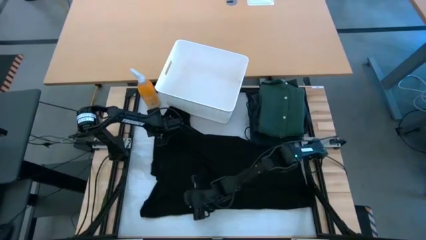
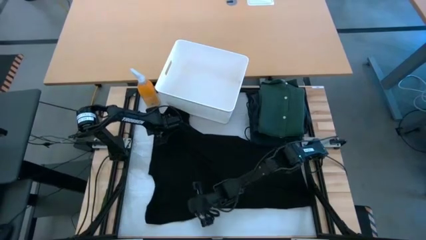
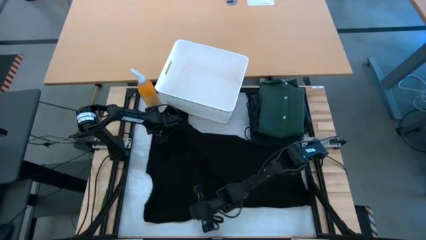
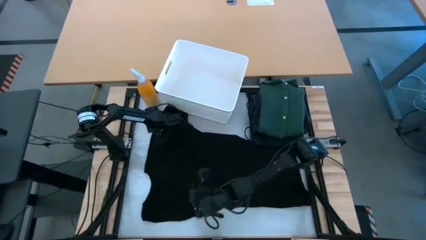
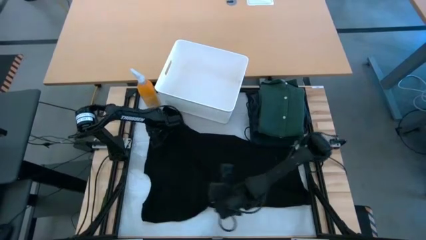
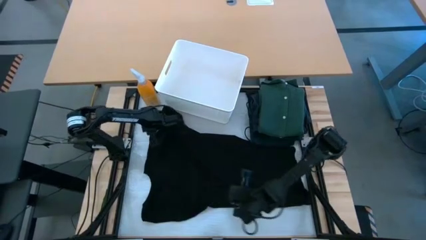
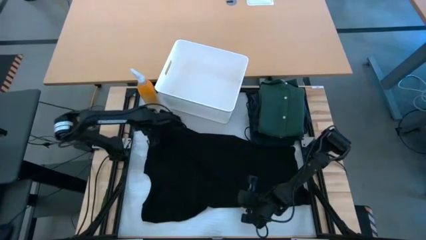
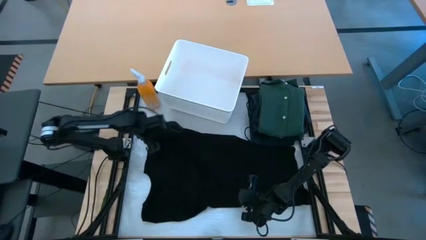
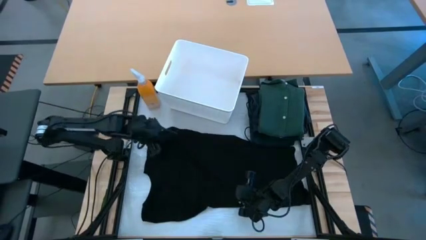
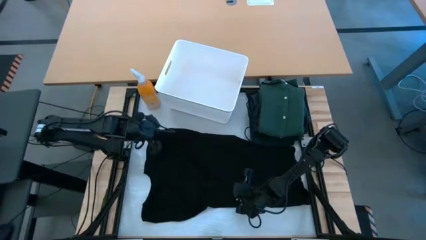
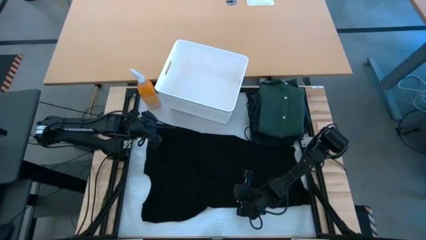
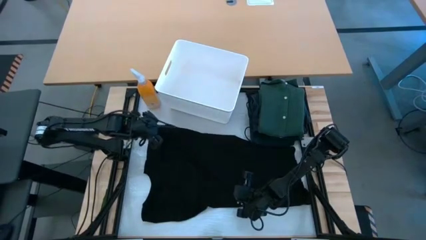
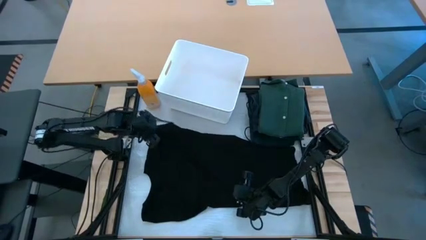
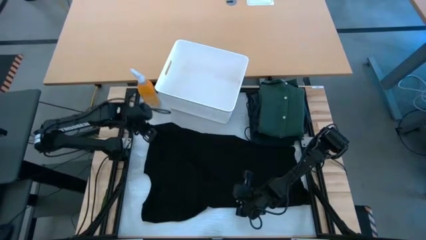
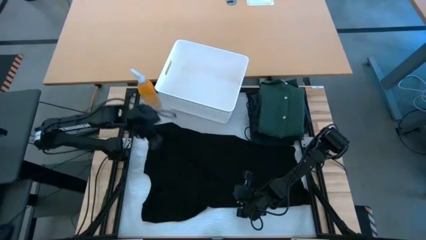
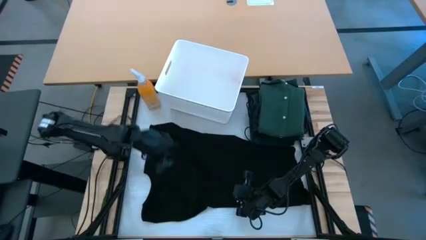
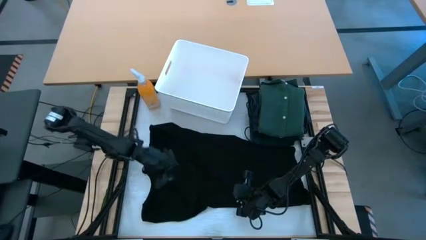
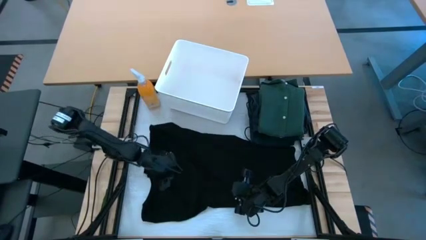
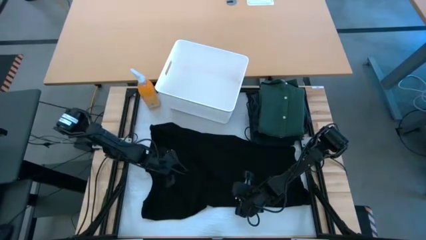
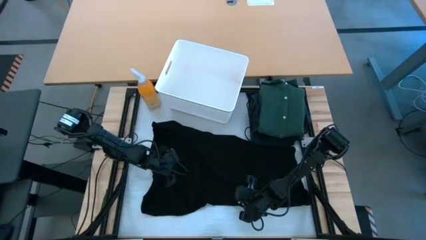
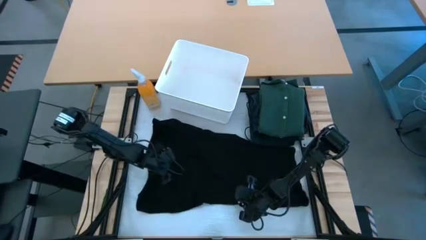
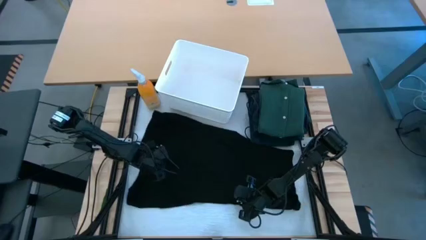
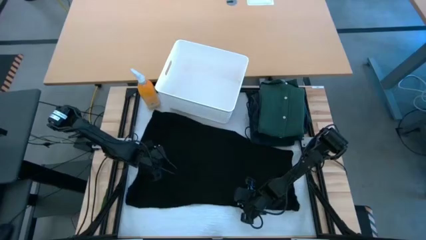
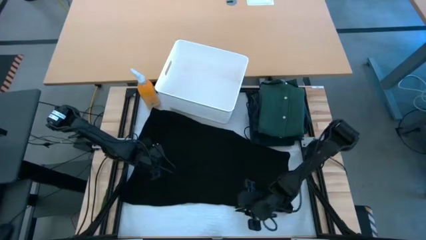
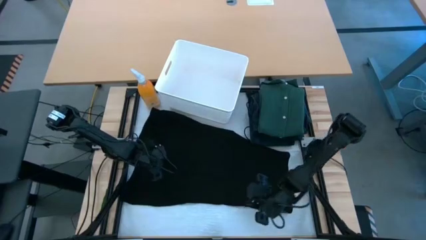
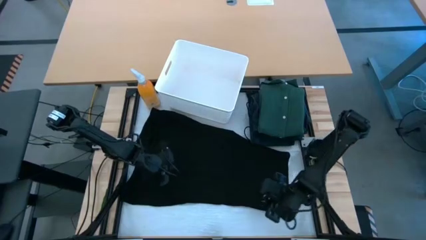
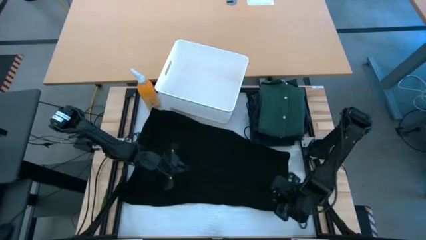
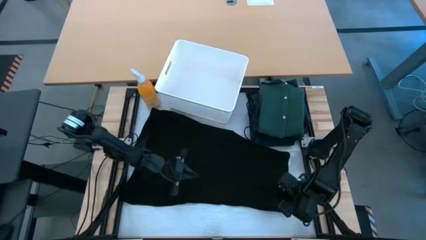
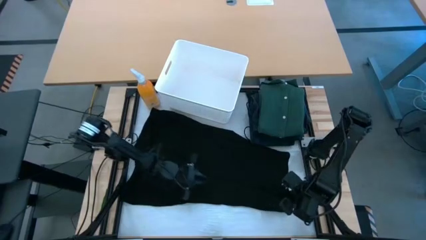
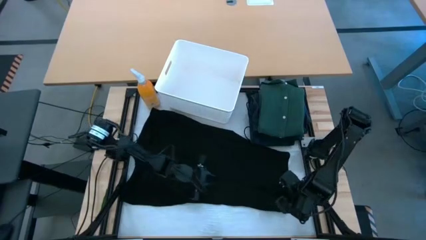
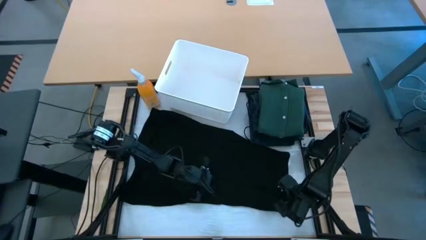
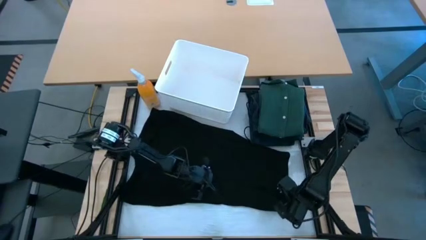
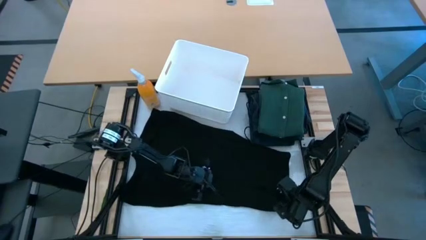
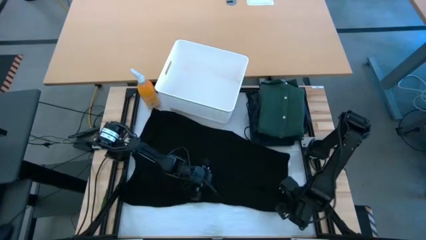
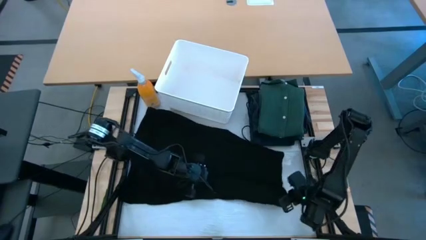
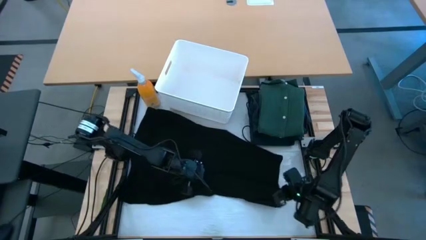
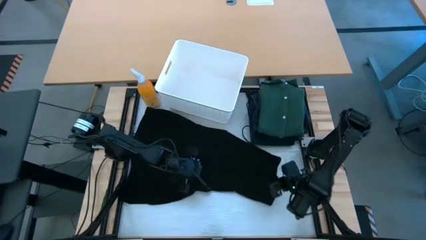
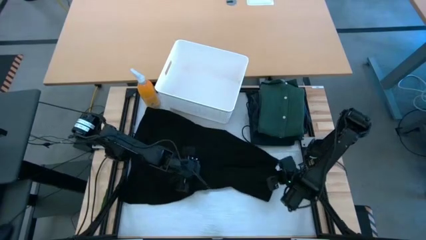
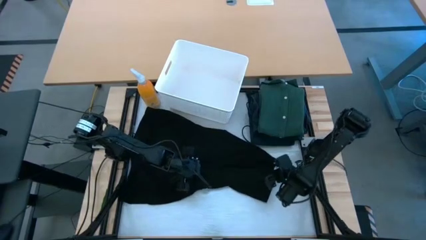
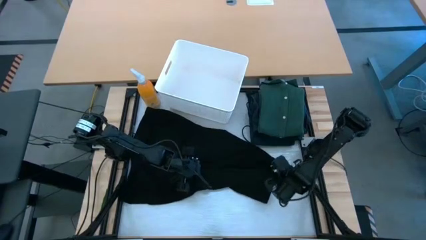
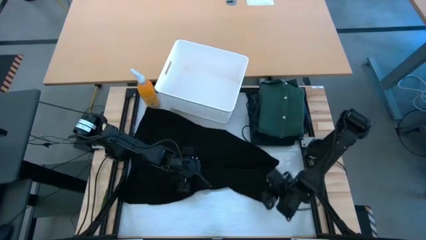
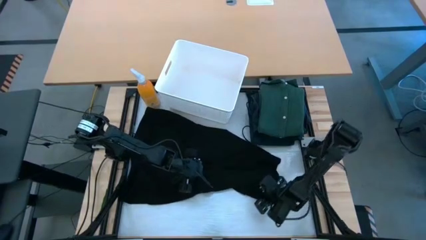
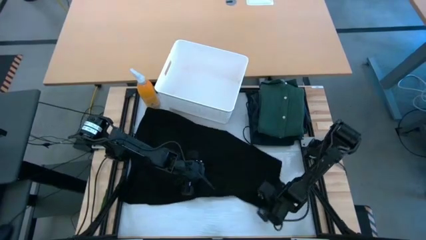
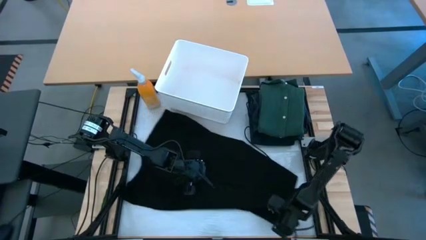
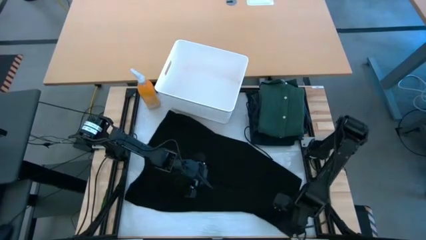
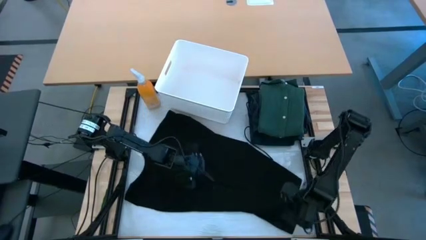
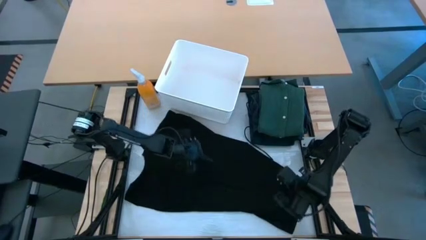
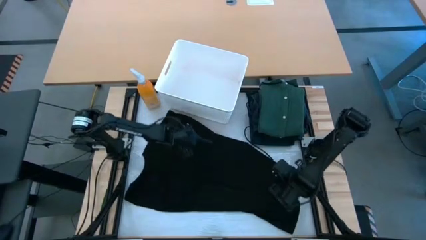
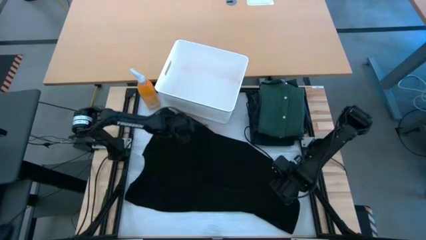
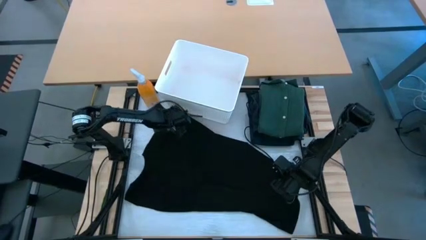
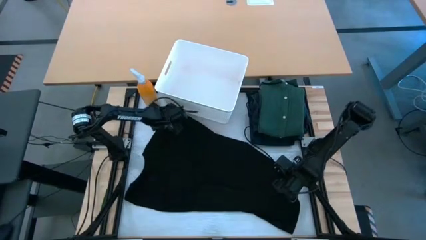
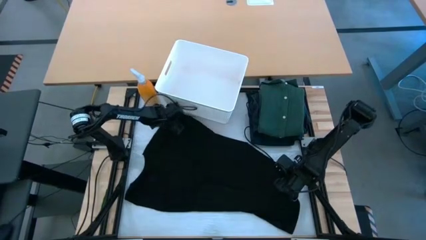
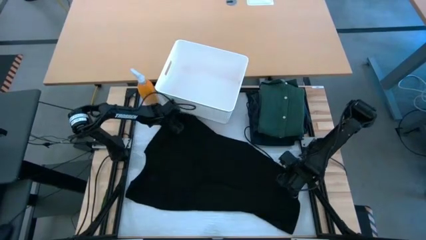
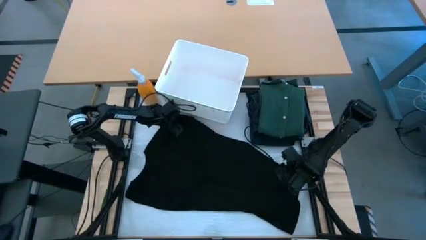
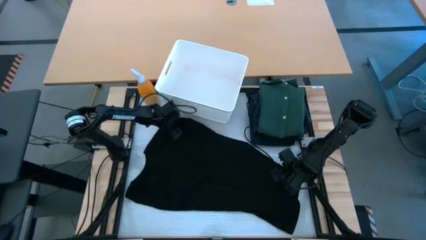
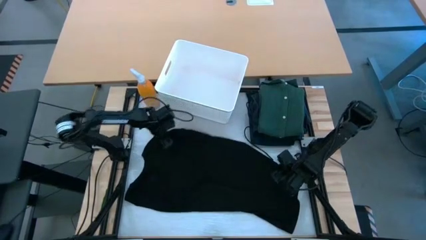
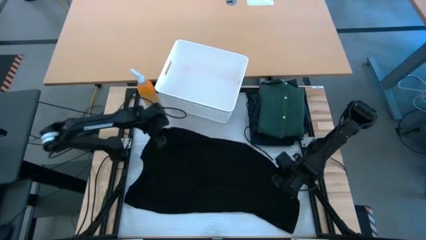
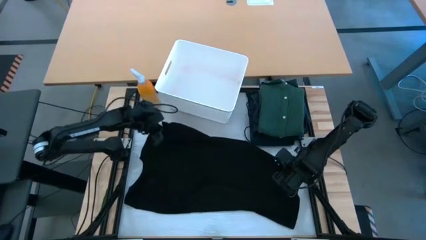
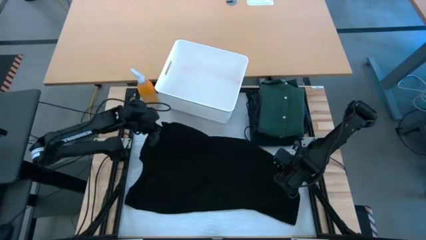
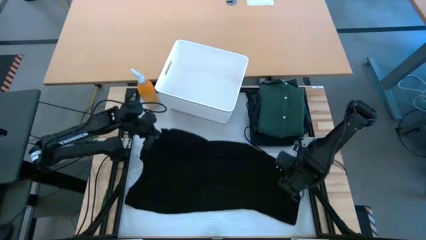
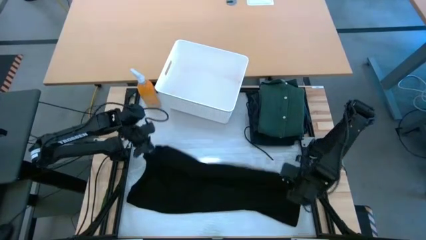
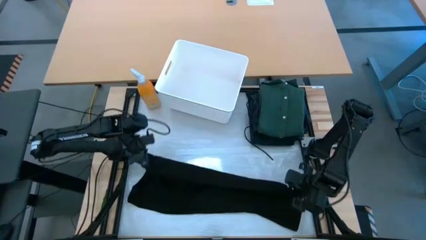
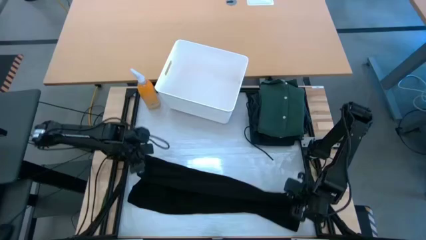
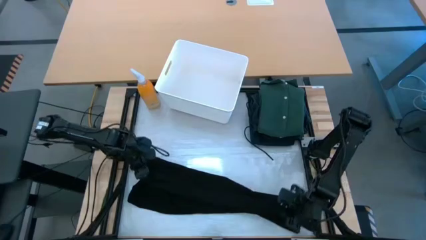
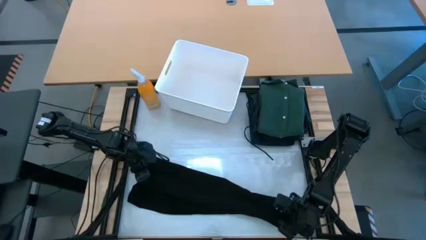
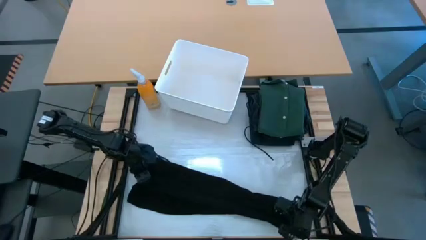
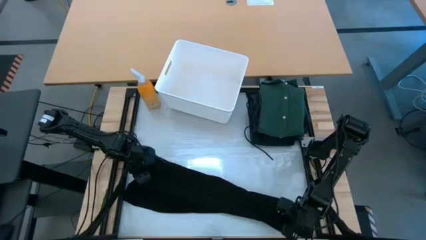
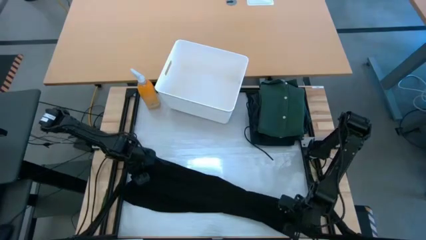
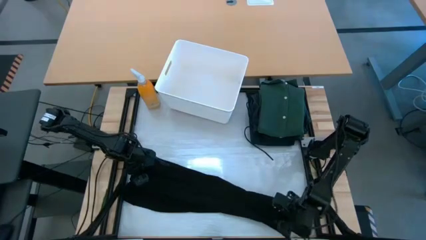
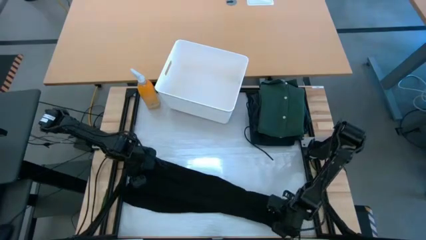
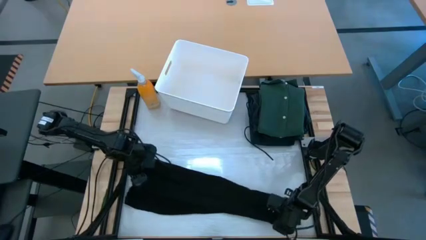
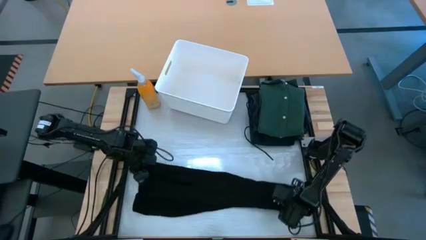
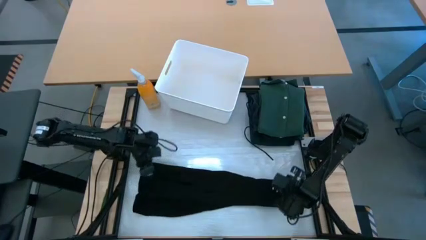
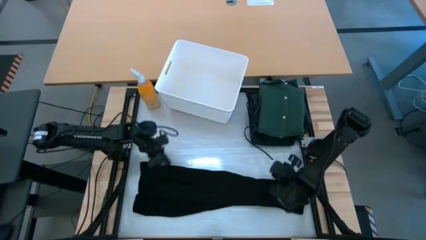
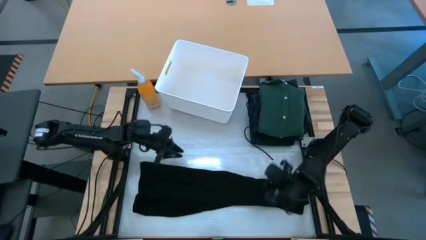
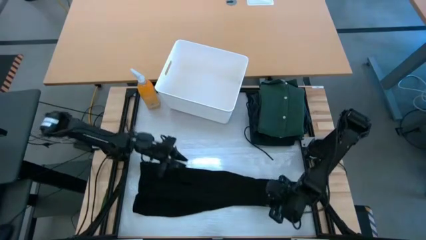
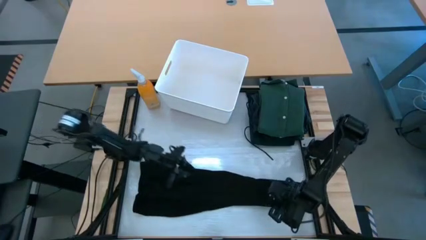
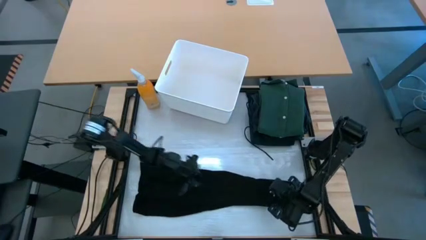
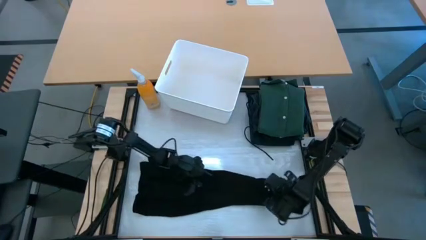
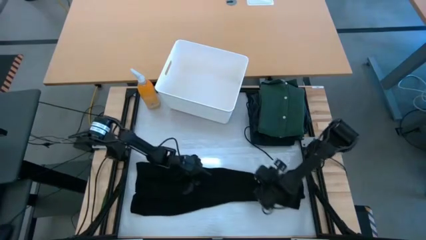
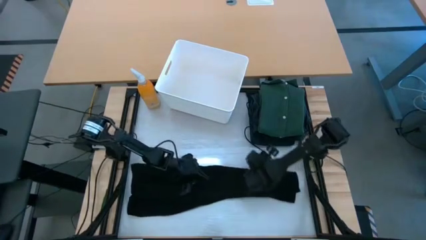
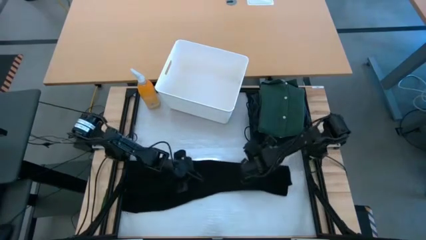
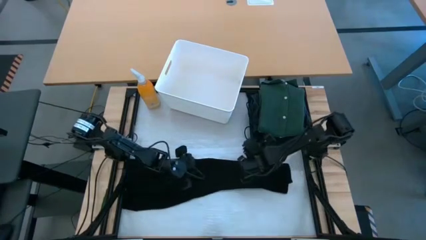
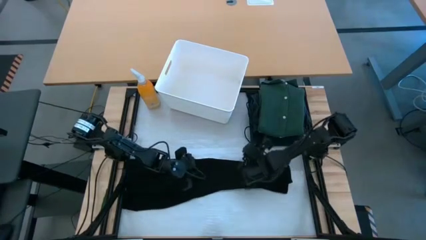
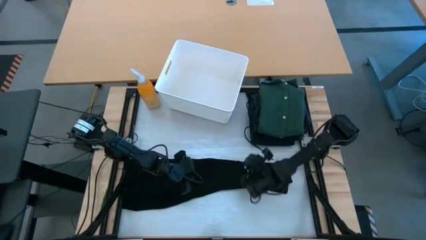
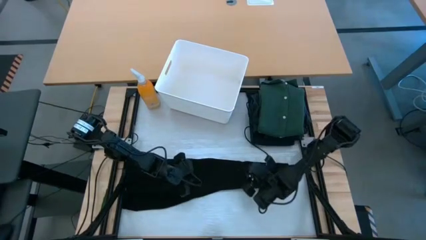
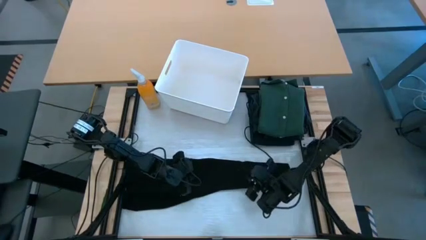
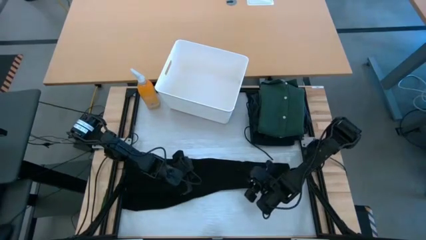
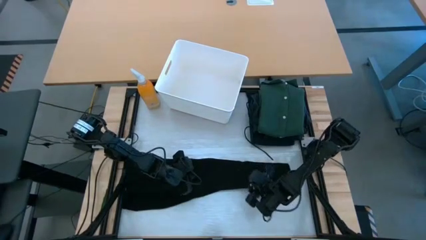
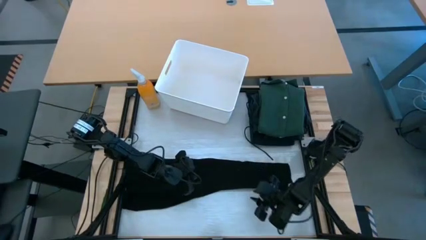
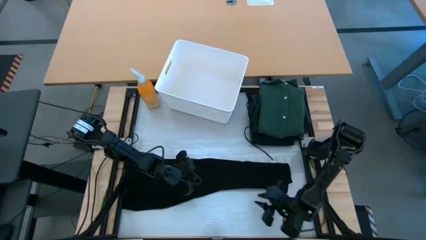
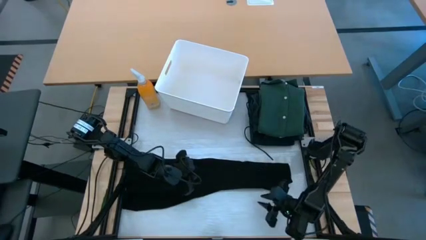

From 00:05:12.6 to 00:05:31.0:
Task: Fold laundry
Fold the black shirt
